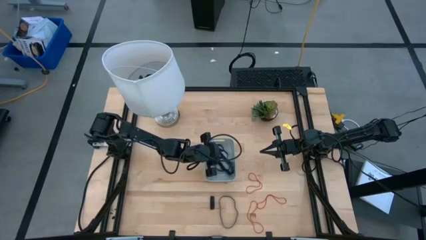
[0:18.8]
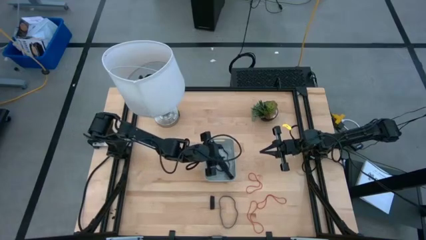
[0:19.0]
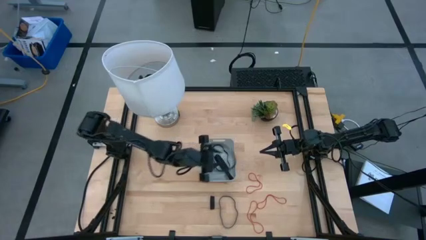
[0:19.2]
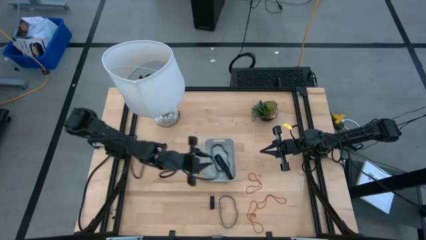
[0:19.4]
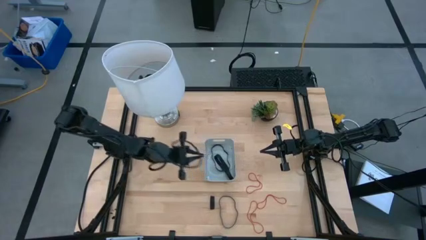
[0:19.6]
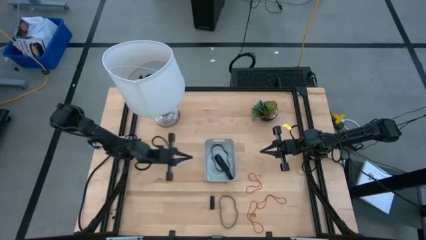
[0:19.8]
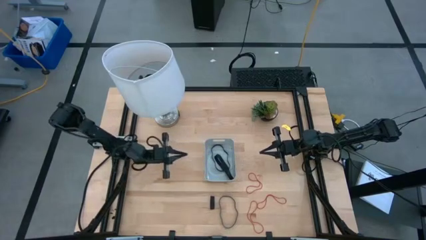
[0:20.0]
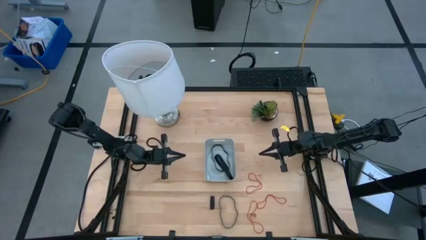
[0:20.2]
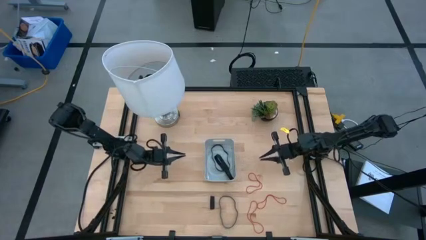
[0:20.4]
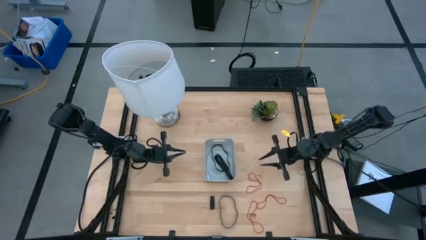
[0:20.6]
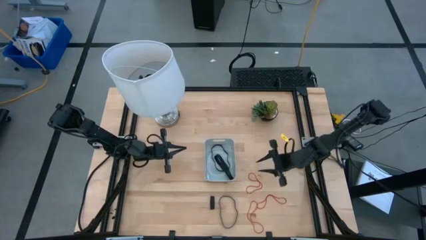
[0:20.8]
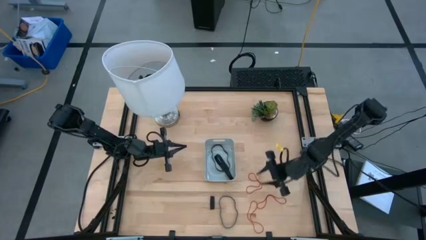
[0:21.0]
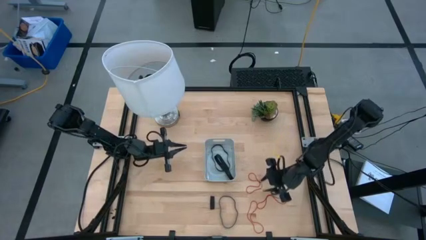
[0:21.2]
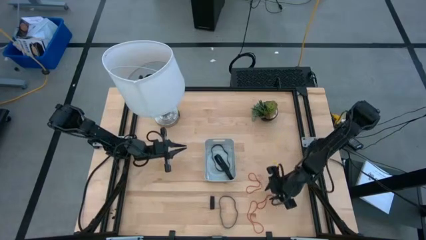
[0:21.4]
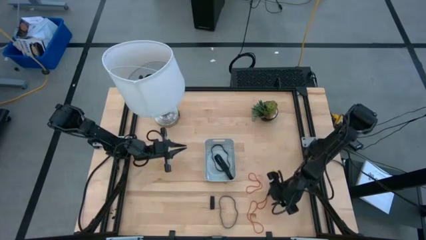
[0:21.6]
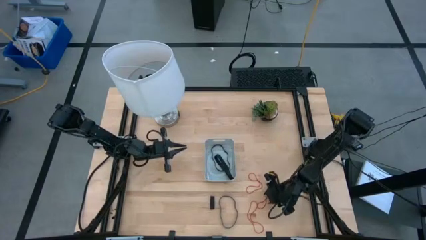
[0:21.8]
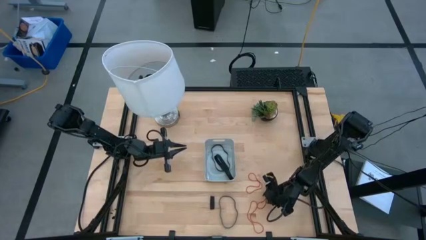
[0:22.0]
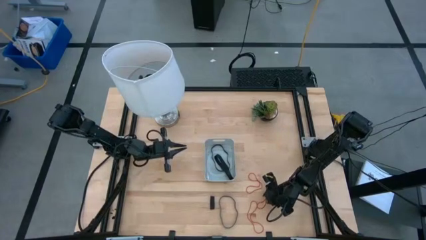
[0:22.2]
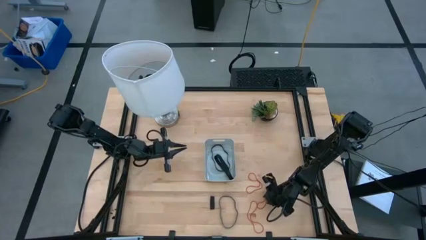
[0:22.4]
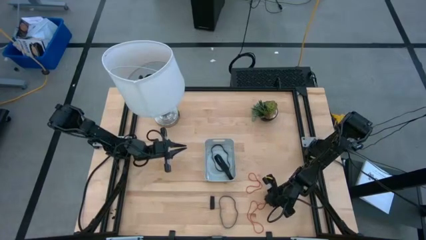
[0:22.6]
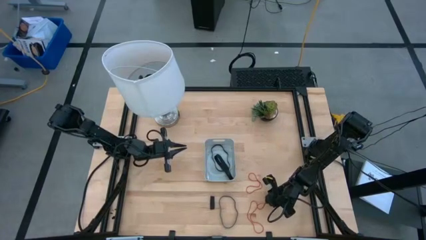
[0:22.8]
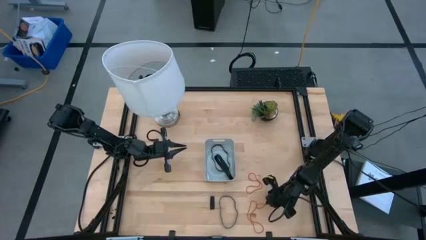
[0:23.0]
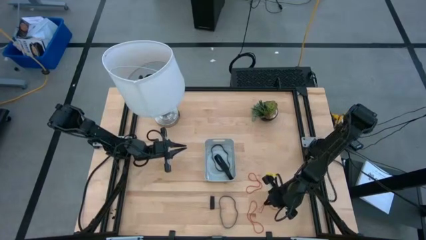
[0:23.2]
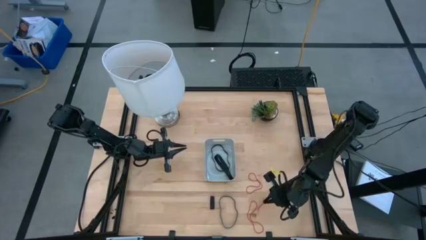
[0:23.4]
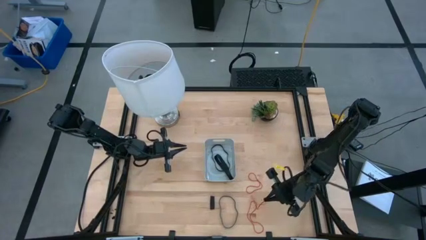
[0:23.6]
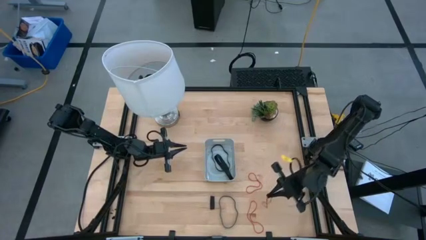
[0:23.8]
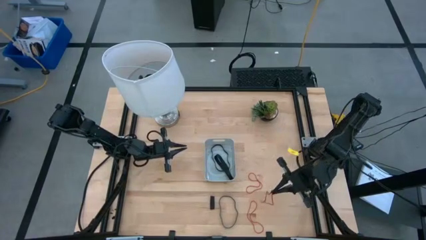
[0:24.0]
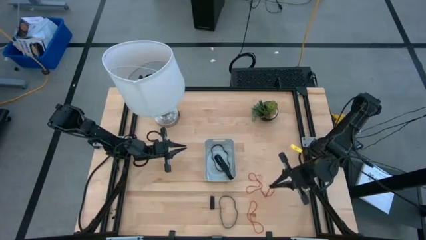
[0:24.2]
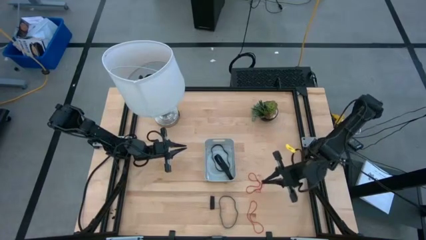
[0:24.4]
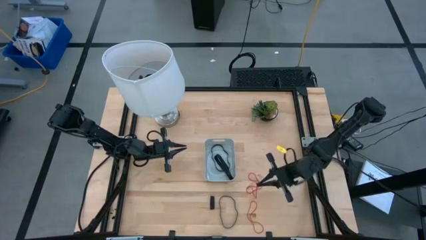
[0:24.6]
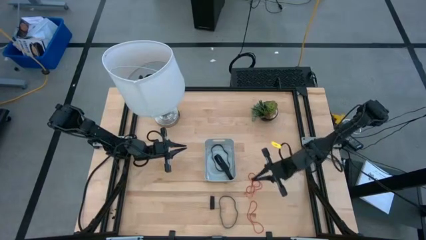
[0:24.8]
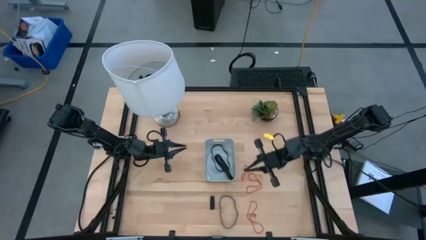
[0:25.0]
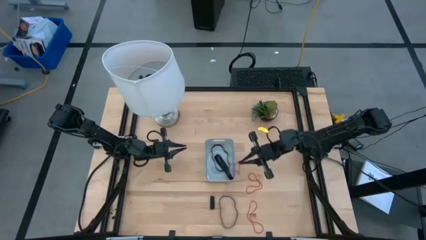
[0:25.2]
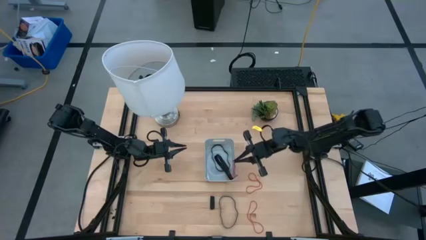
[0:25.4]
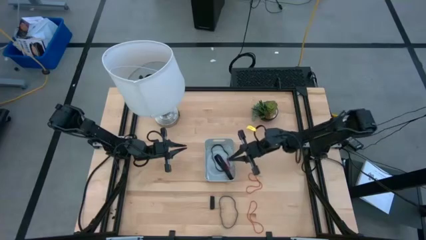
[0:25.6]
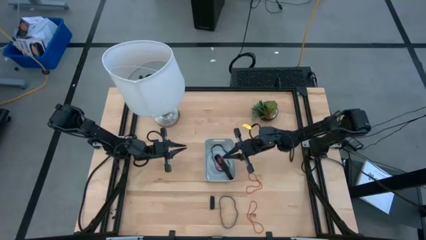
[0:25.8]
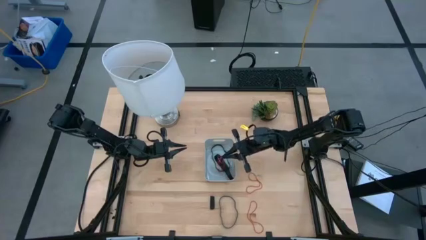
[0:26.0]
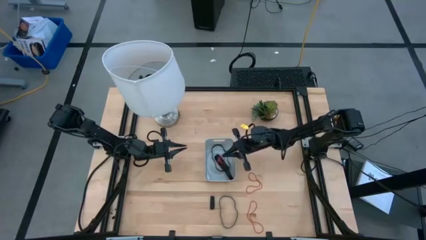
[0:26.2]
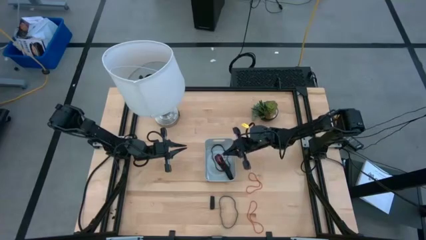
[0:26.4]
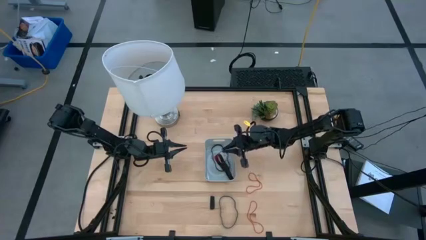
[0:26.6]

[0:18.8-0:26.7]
Task: Pick and place rubber bands into bin
Put the middle right red rubber band into the gray bin

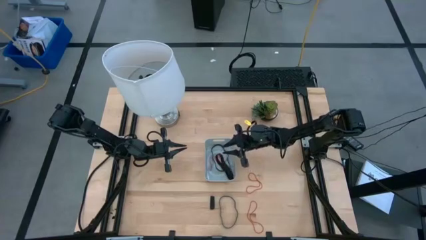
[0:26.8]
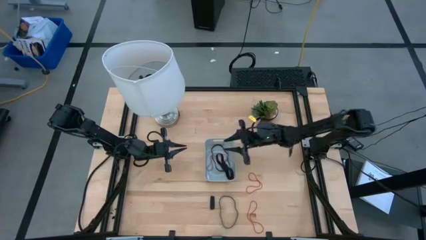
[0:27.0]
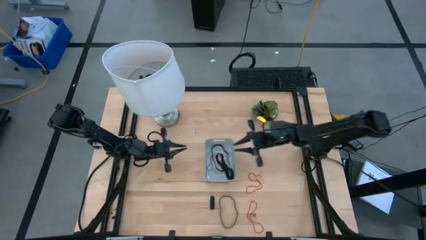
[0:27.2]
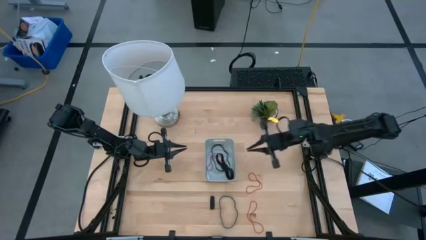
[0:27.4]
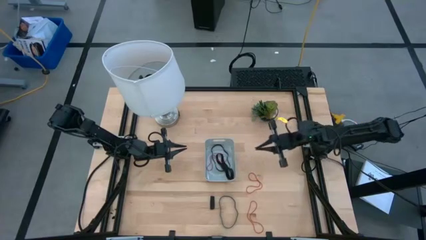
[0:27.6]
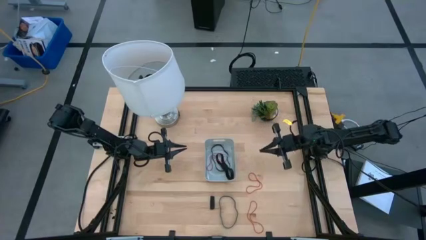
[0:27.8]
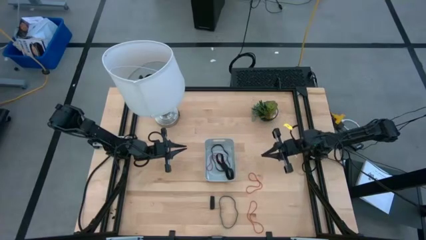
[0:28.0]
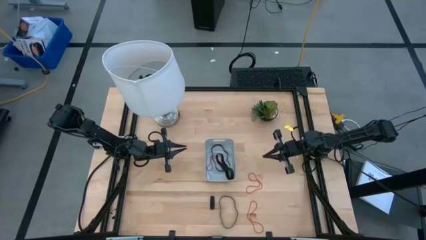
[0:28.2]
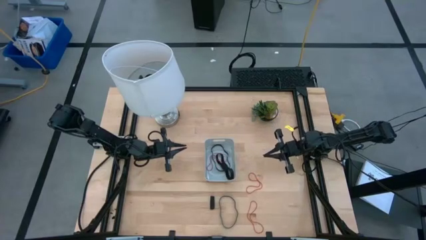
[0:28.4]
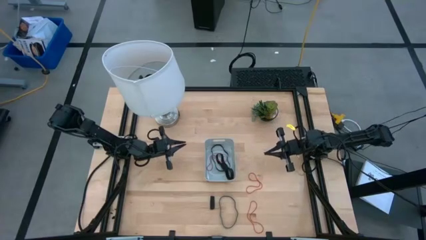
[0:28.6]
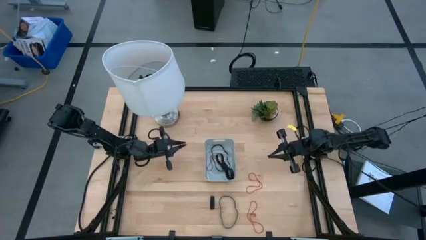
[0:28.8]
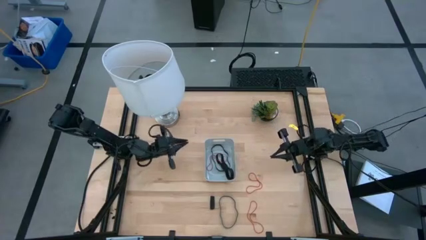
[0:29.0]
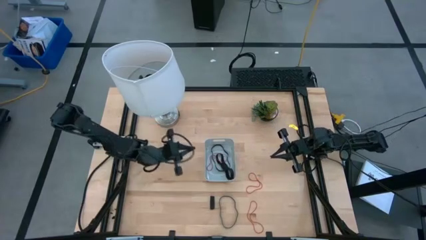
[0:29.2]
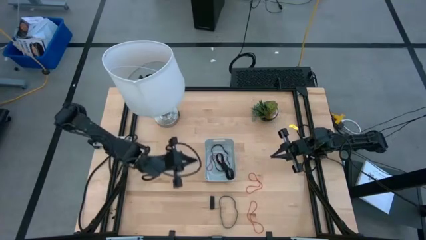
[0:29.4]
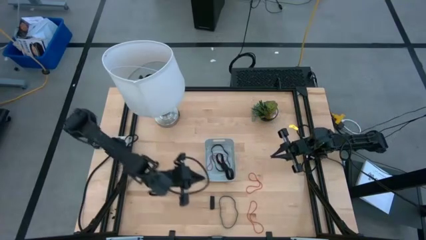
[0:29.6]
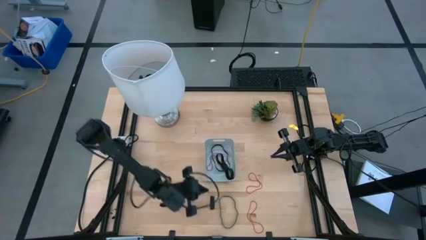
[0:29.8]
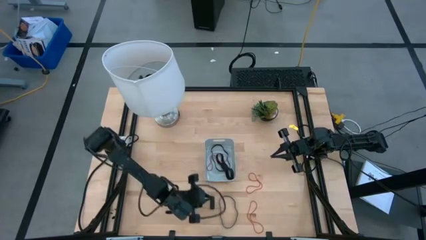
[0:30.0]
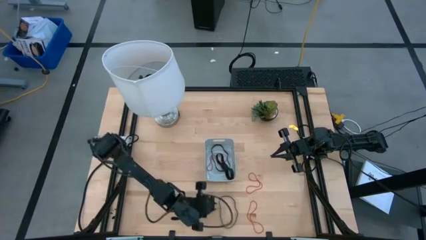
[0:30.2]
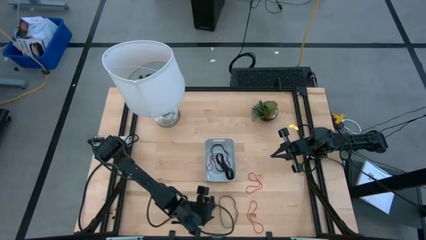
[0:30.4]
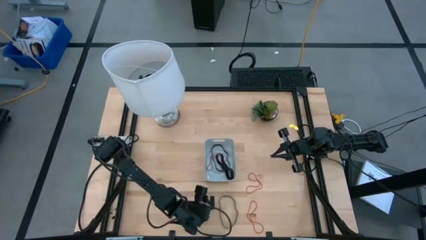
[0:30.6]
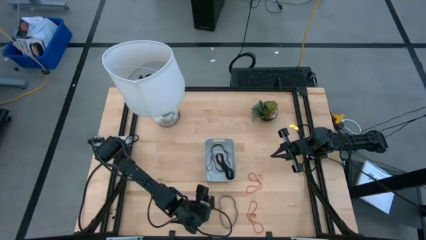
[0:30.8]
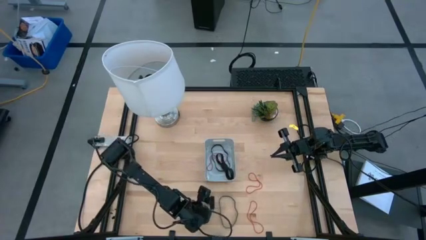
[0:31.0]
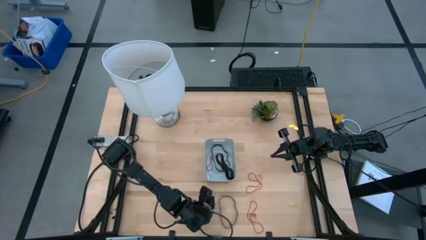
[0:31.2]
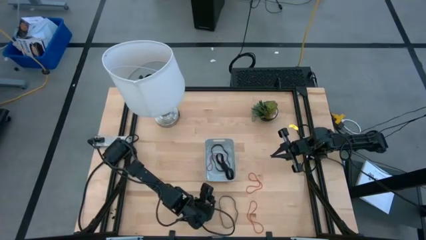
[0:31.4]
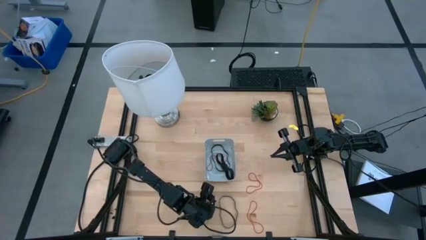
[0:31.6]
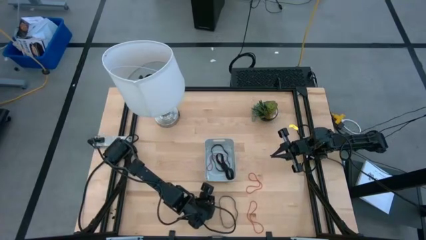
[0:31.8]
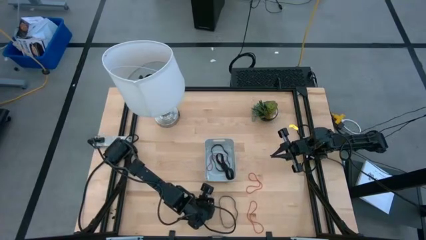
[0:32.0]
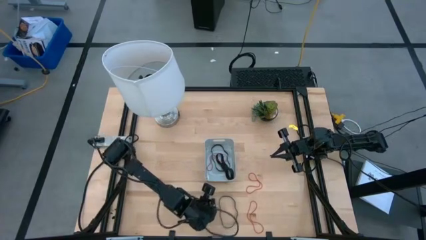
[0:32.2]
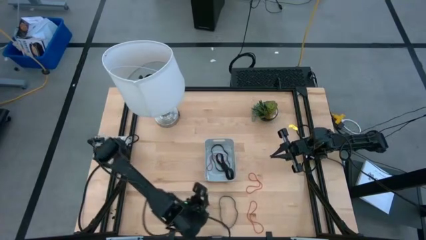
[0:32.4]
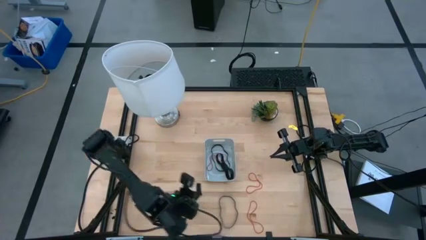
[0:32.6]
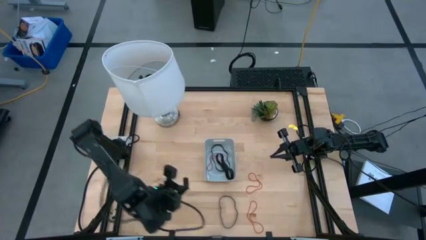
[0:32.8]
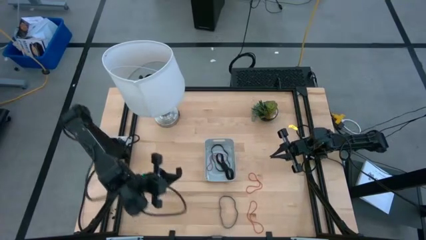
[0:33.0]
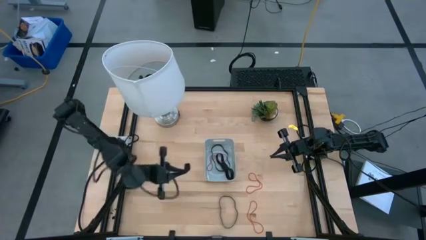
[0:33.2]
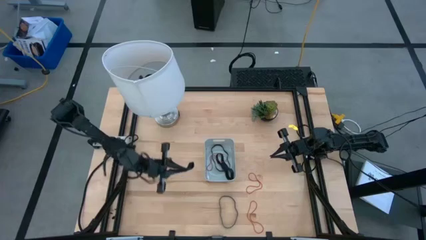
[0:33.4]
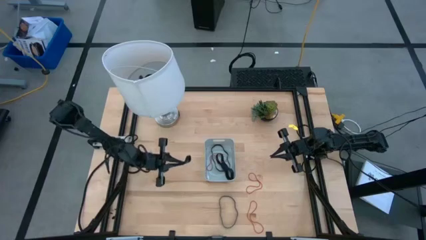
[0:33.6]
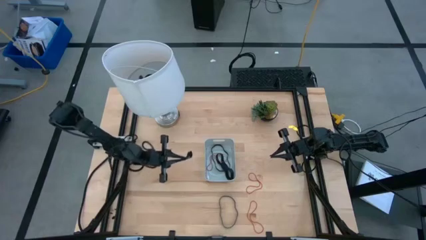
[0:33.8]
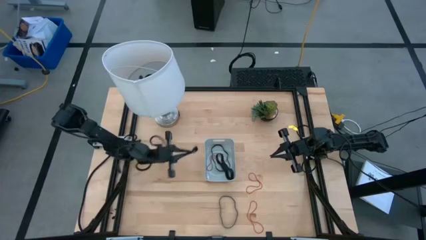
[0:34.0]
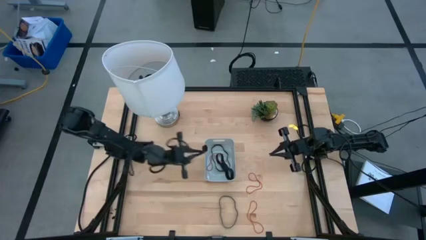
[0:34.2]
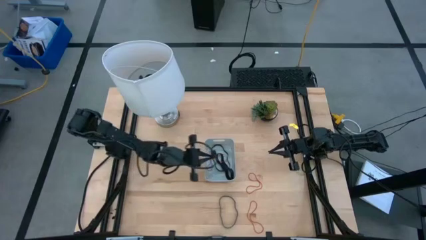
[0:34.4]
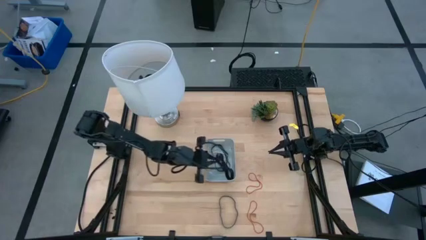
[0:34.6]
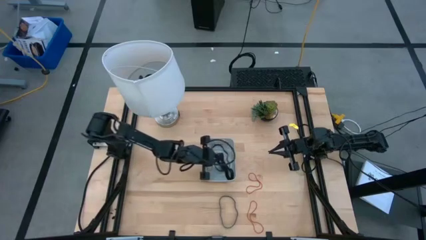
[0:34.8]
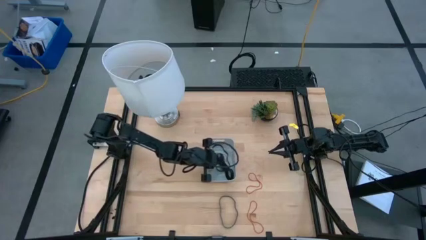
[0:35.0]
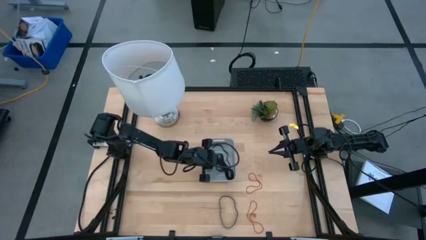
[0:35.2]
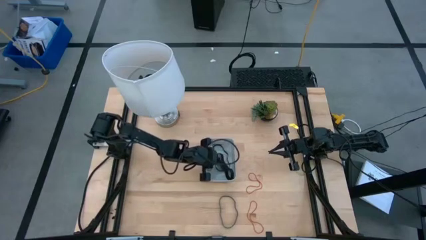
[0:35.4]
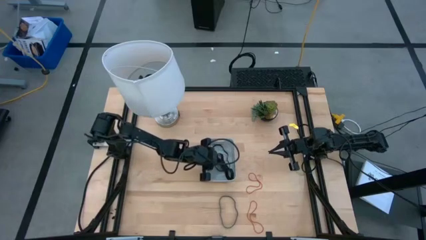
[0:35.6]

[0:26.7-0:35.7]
Put the small black rubber band into the gray bin
